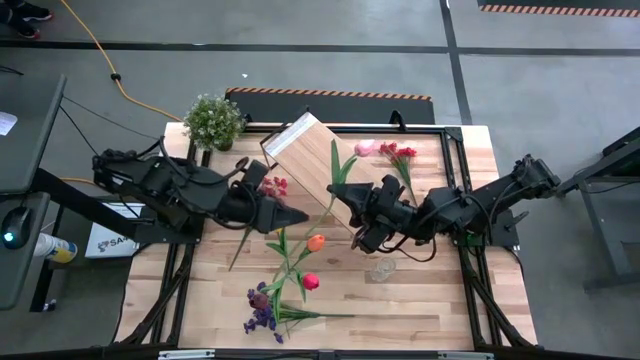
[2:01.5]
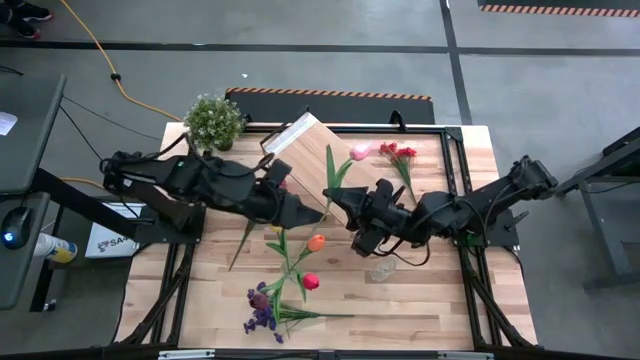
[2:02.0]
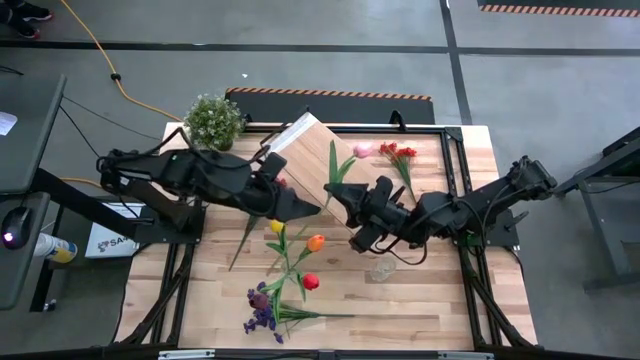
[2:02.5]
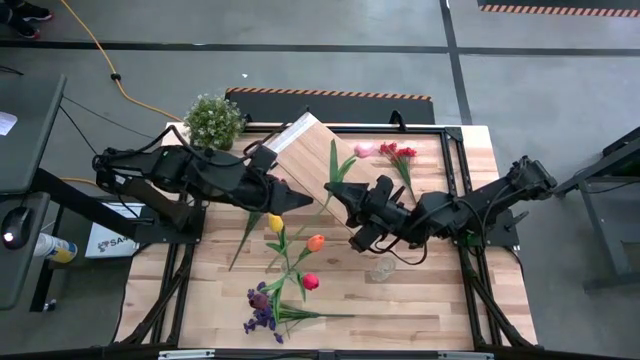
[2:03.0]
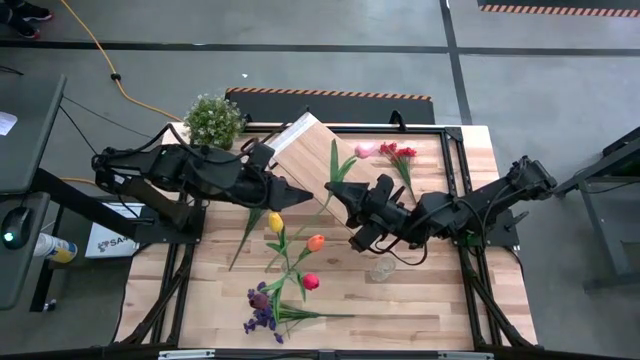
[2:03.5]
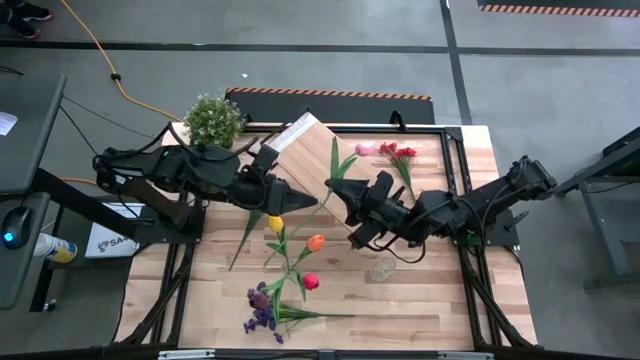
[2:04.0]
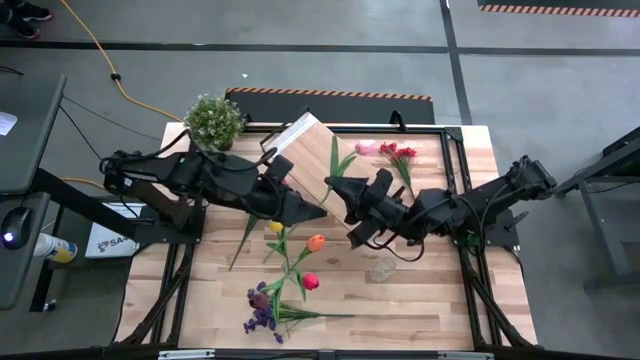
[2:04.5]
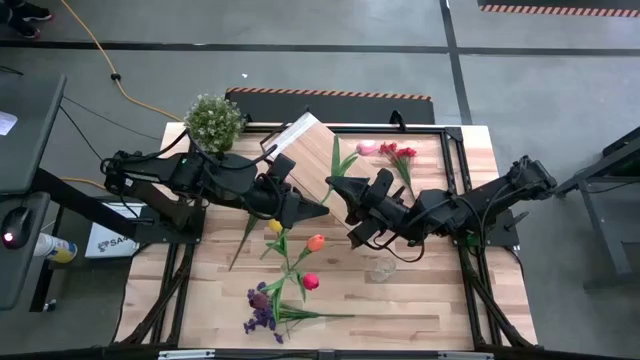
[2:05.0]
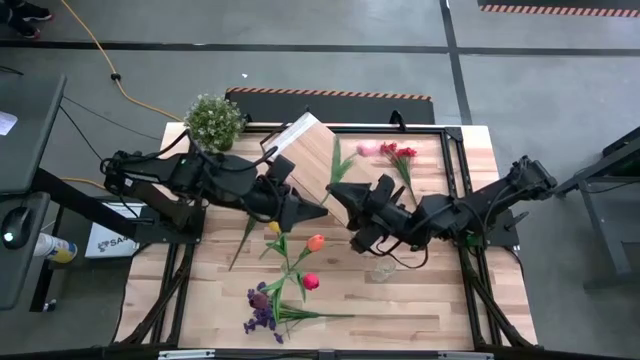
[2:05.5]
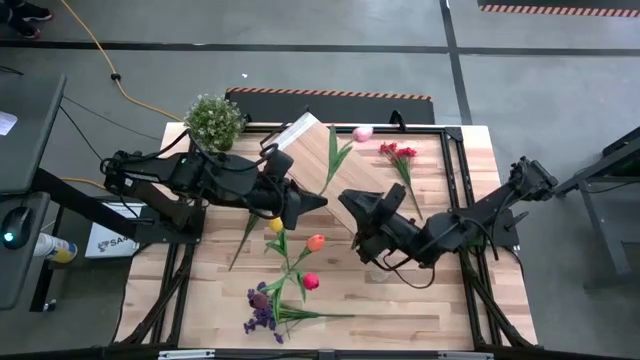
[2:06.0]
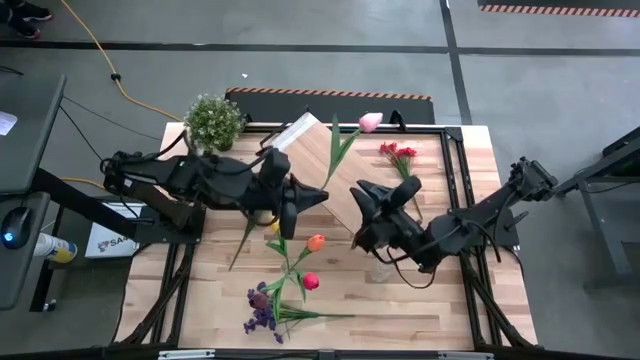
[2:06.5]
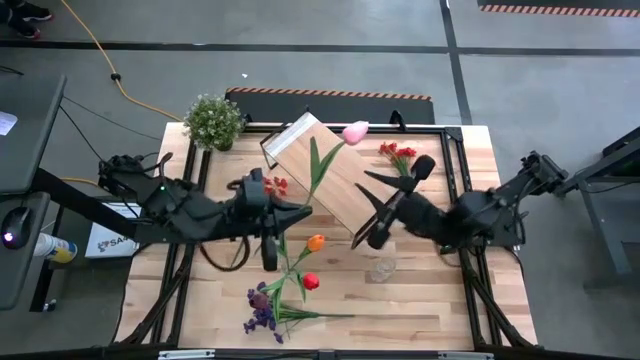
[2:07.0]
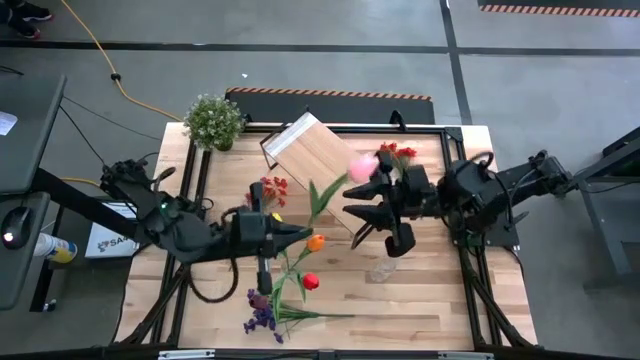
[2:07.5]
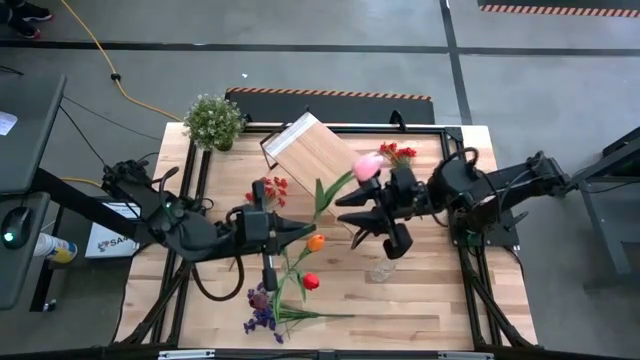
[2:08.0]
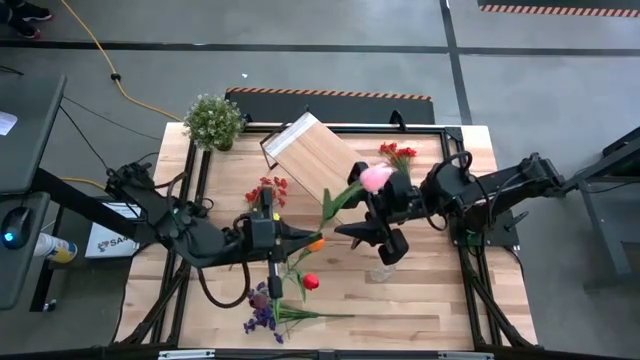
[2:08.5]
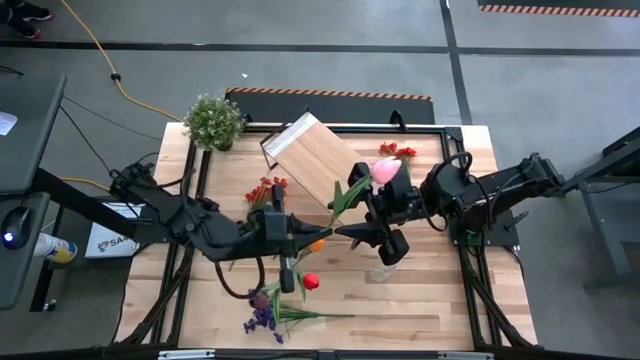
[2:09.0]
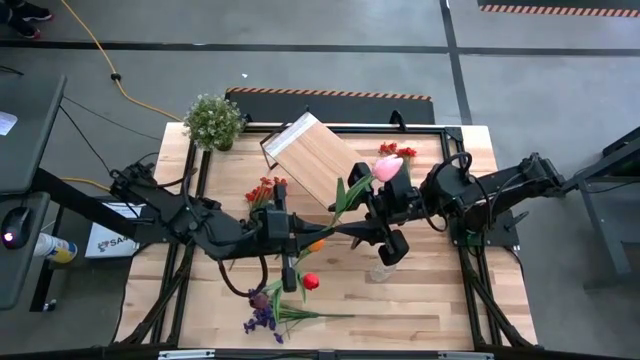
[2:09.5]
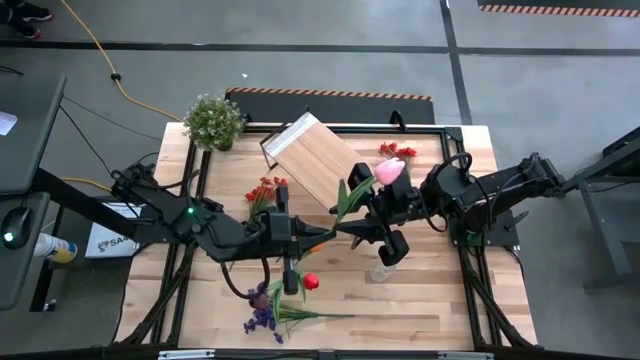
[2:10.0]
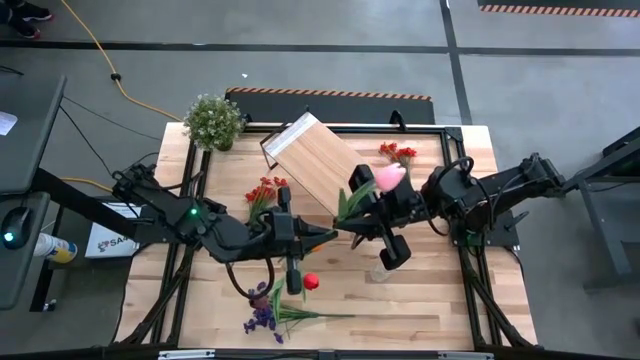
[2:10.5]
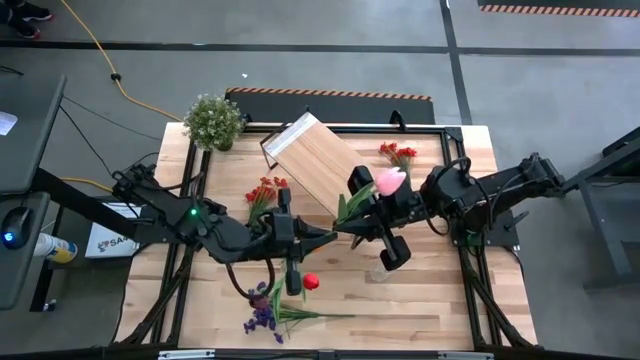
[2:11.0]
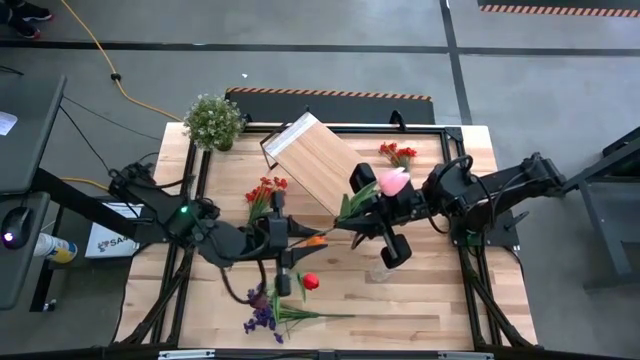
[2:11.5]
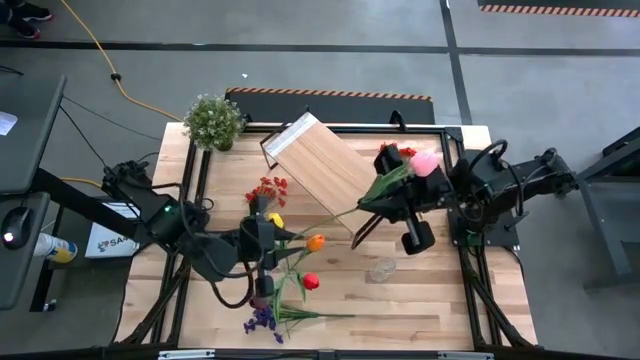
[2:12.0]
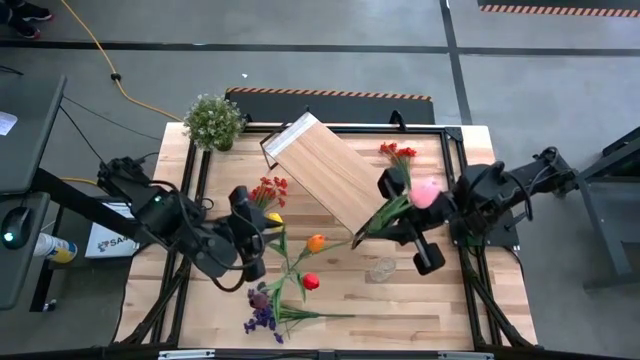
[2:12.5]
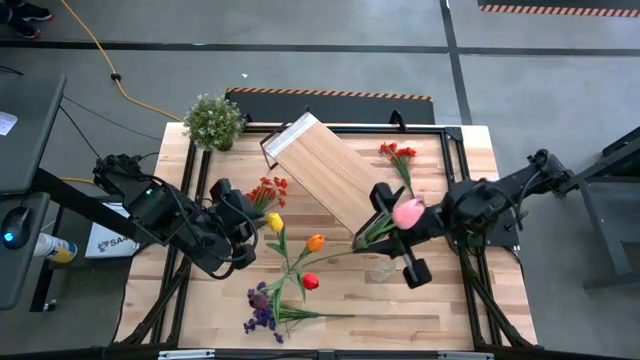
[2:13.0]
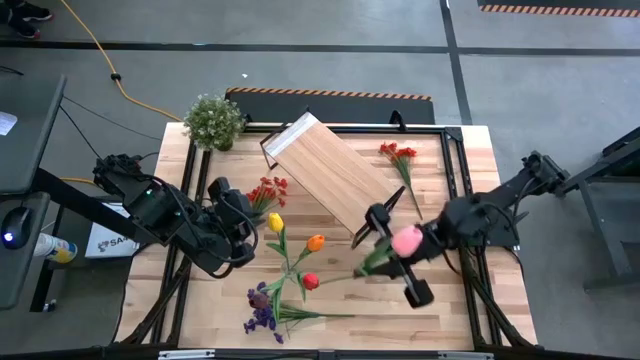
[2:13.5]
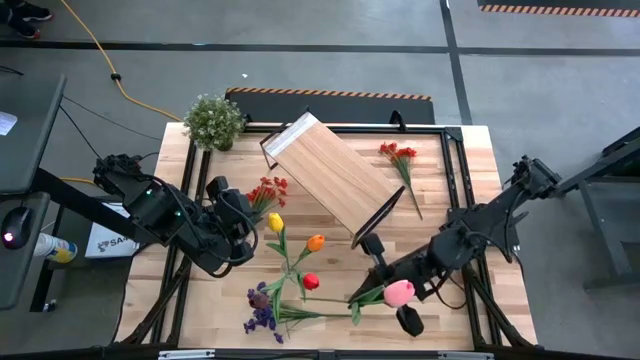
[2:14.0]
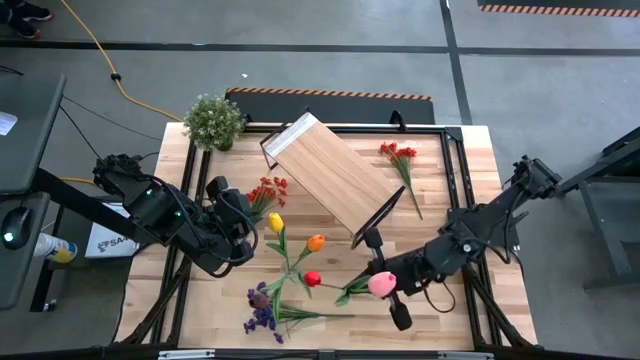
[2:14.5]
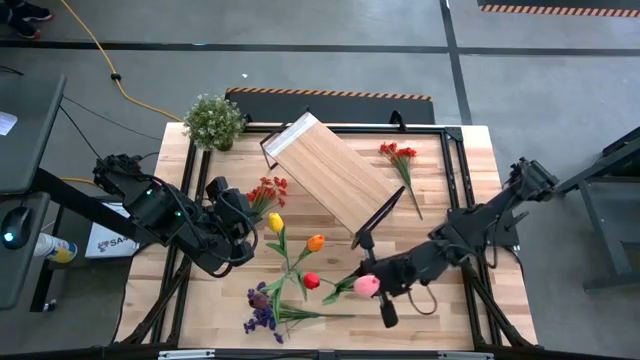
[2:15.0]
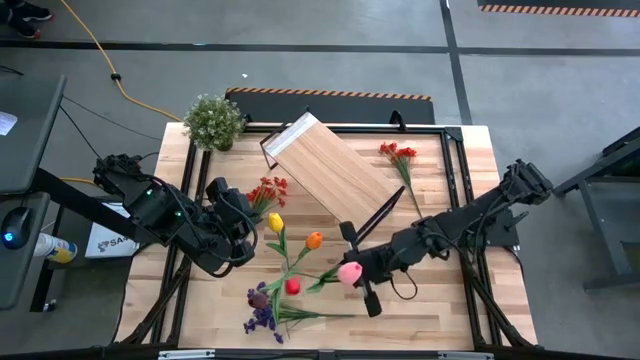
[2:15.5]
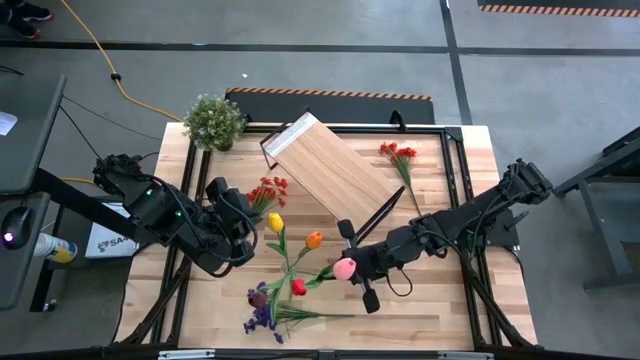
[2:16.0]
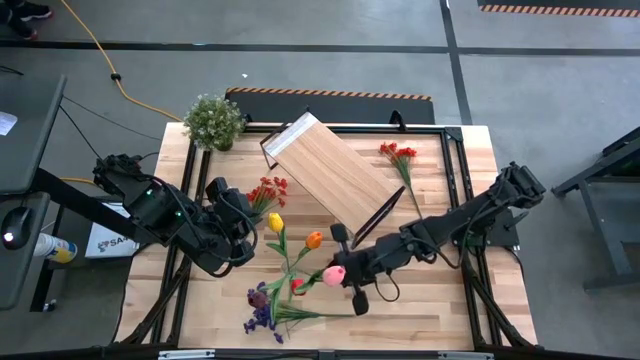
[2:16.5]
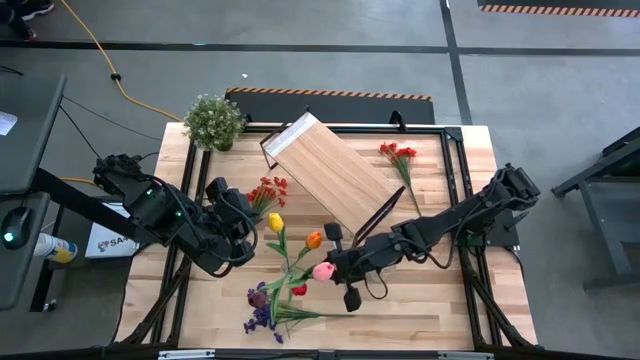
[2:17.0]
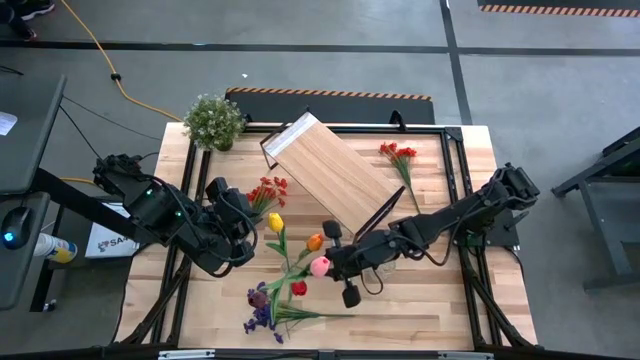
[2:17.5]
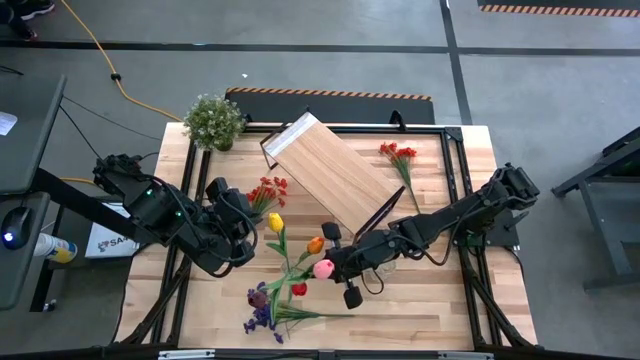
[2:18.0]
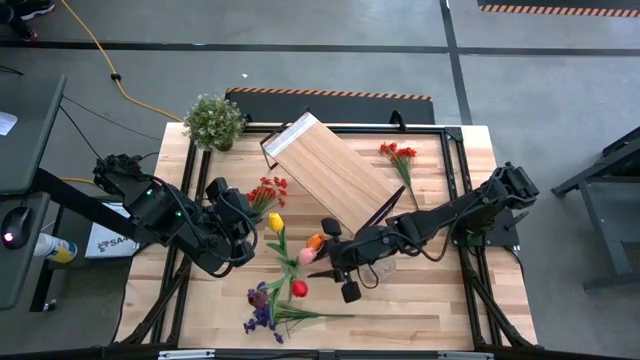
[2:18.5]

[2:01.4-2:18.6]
Task: Pick and place flowers into a vace then onto a shelf
Put the pink tulip into the left transparent vase

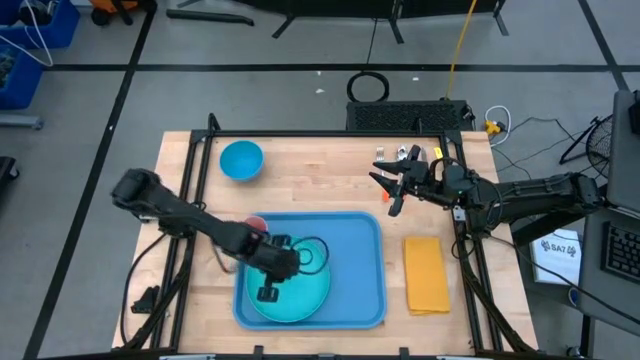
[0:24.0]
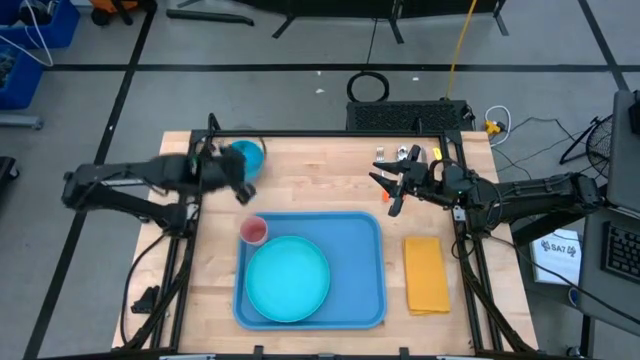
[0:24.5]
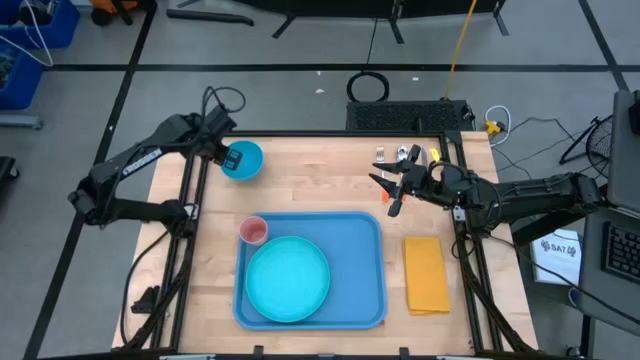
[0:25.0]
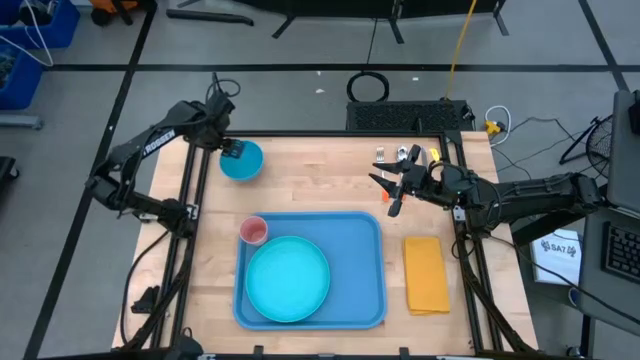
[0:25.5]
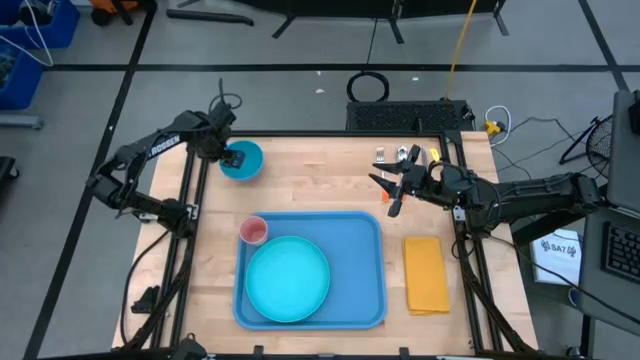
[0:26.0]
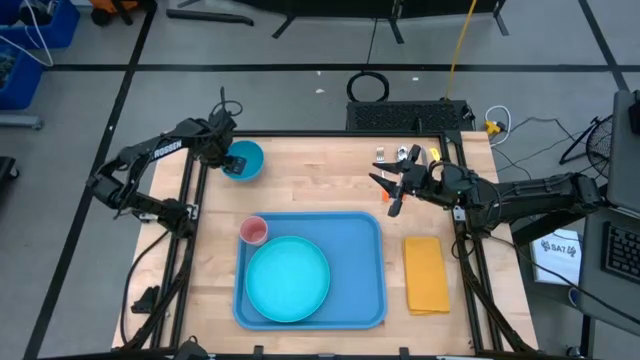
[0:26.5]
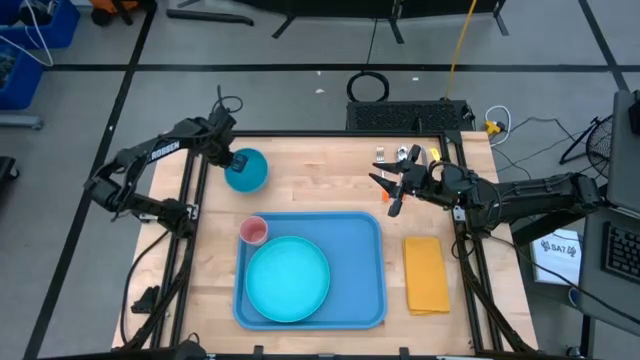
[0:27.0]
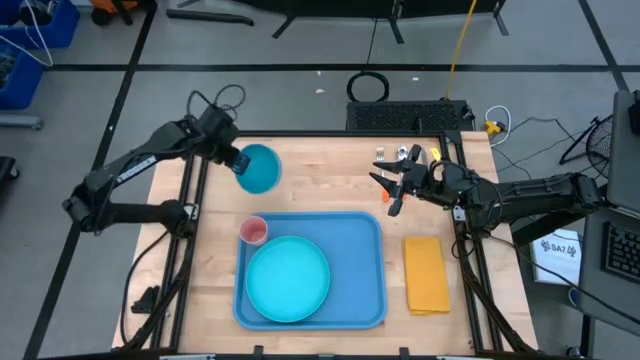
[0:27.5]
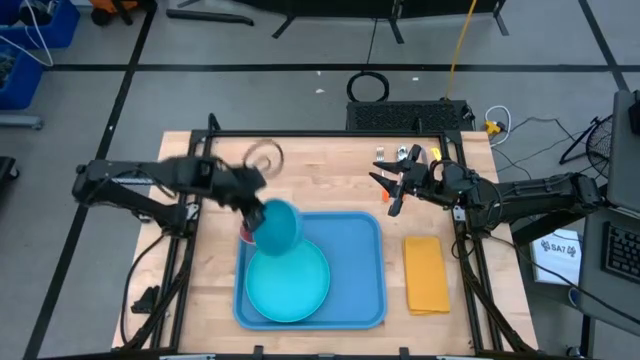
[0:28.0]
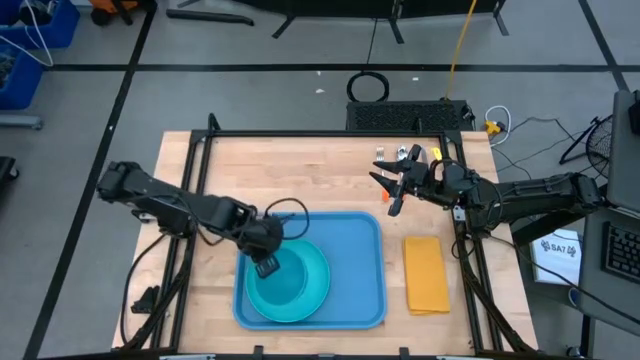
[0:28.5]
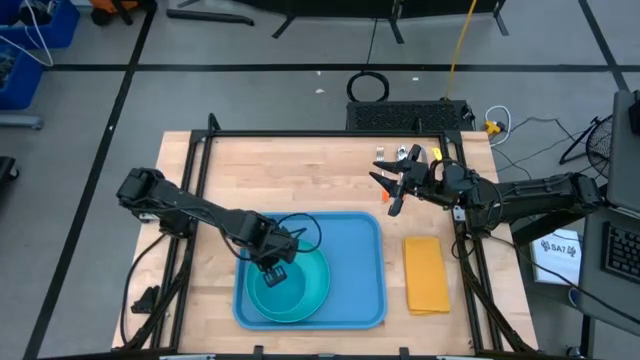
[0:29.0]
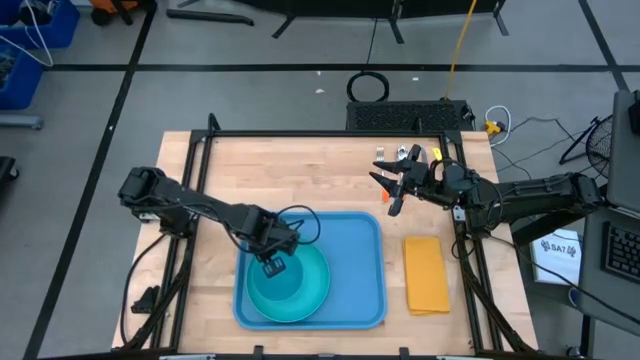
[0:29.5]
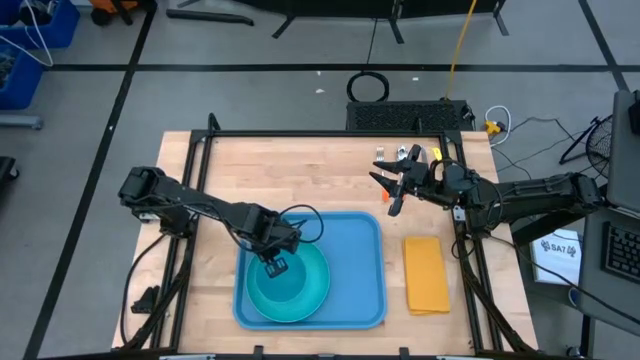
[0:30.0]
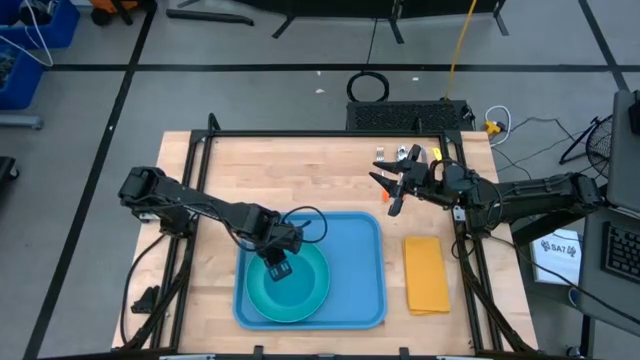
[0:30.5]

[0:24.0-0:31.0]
Task: Set up tray
Put the blue bowl on top of the light blue plate on the blue serving tray
